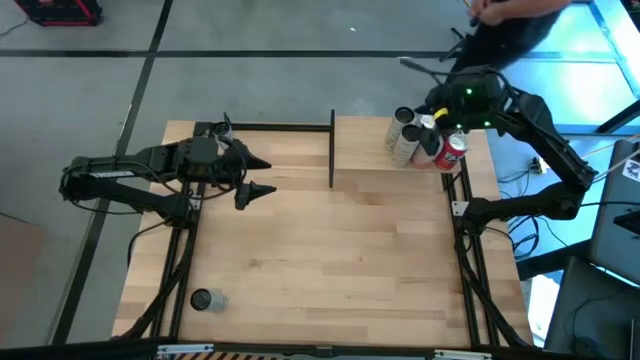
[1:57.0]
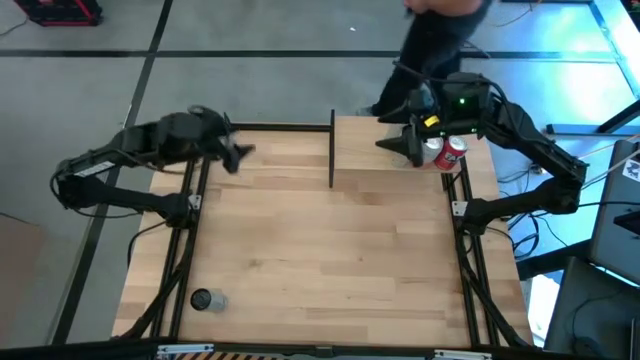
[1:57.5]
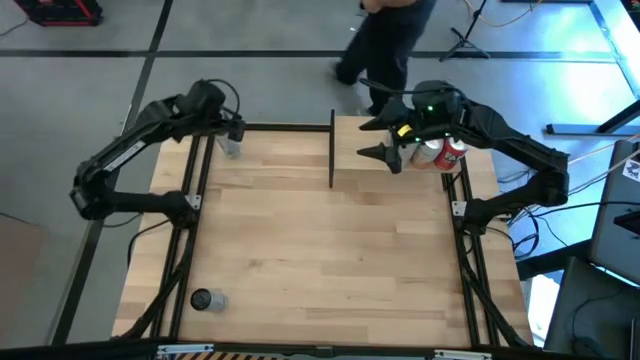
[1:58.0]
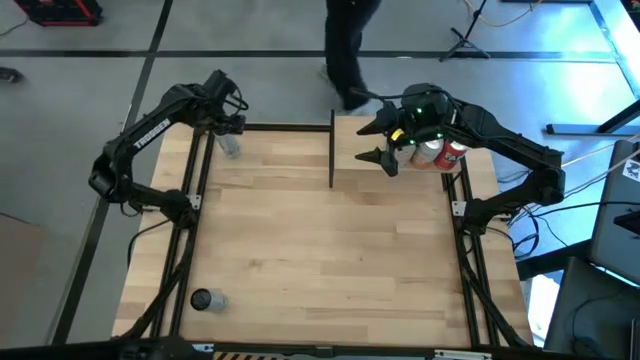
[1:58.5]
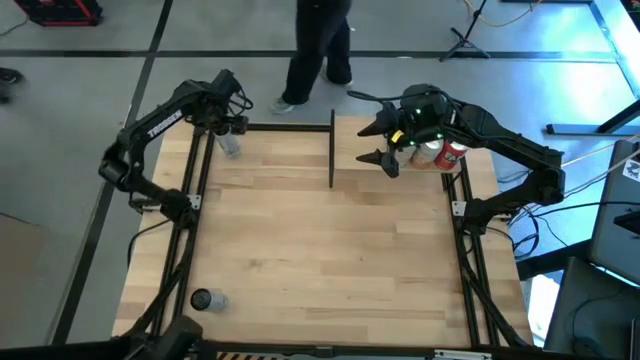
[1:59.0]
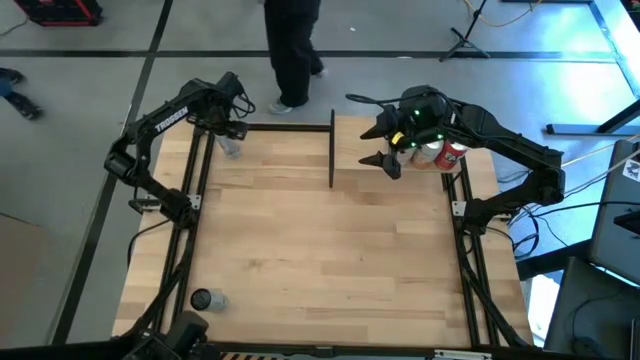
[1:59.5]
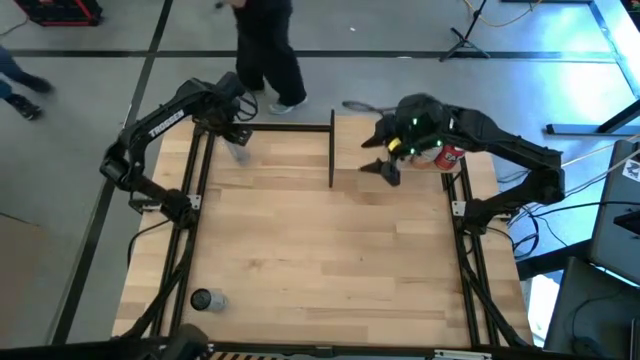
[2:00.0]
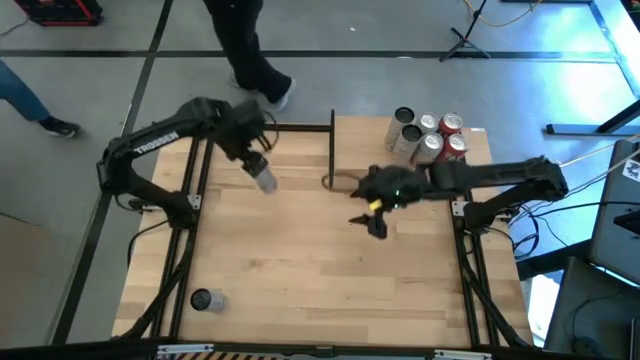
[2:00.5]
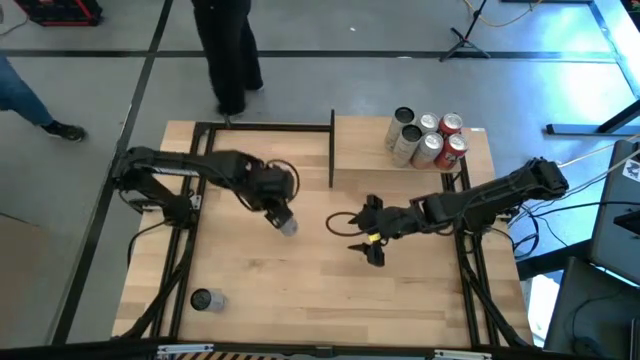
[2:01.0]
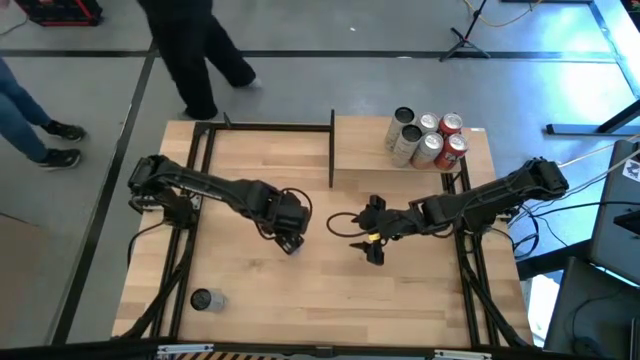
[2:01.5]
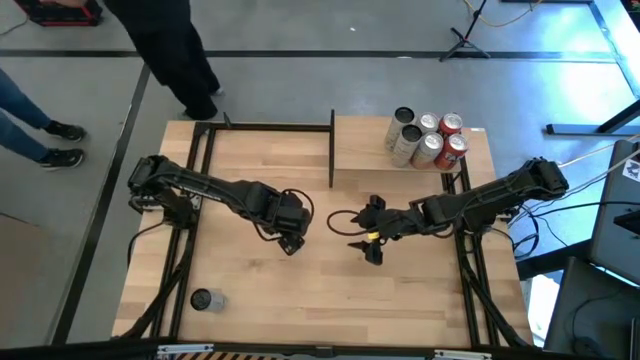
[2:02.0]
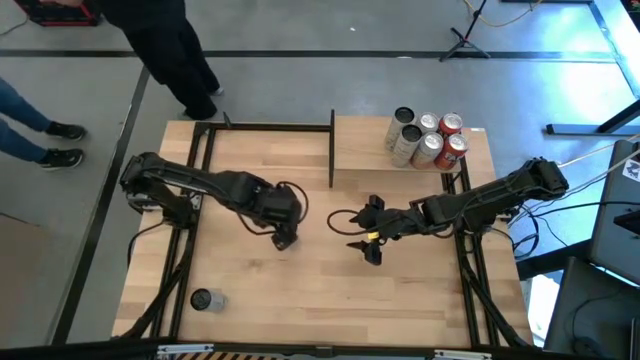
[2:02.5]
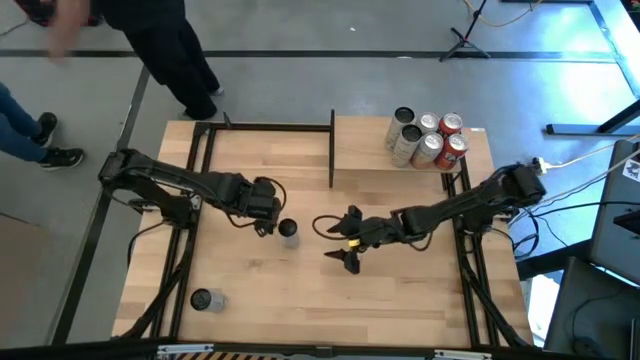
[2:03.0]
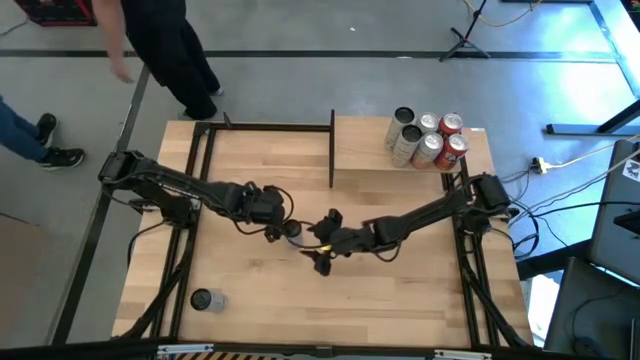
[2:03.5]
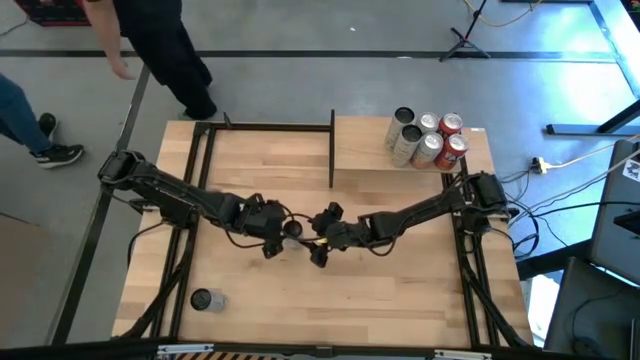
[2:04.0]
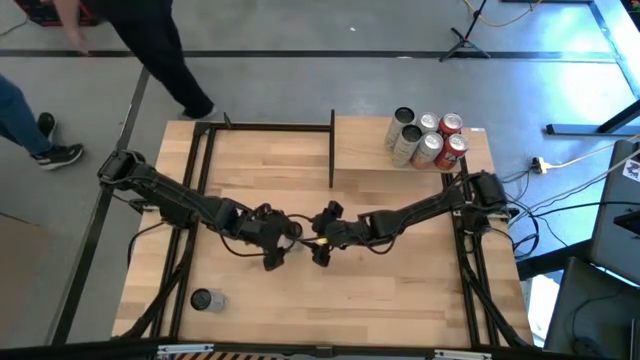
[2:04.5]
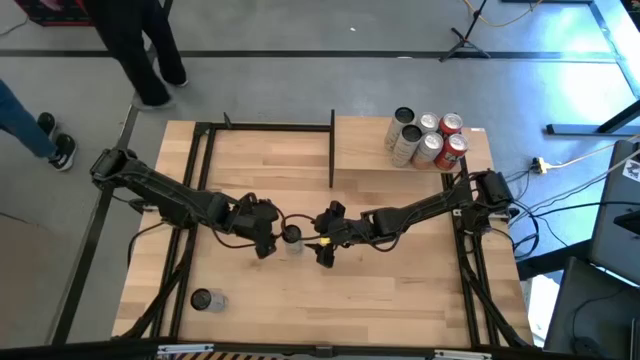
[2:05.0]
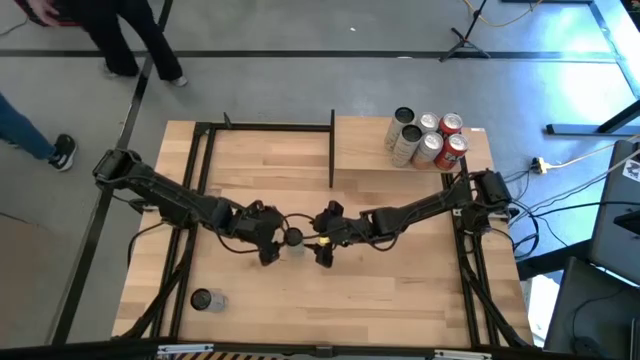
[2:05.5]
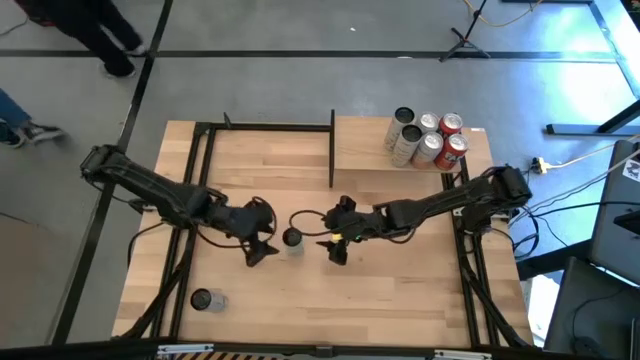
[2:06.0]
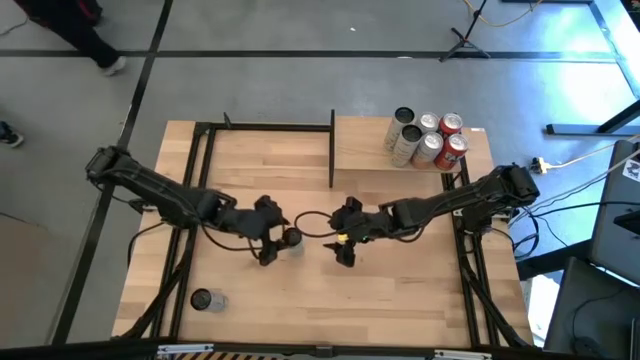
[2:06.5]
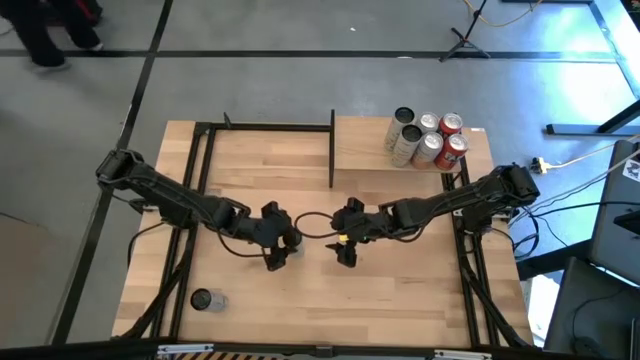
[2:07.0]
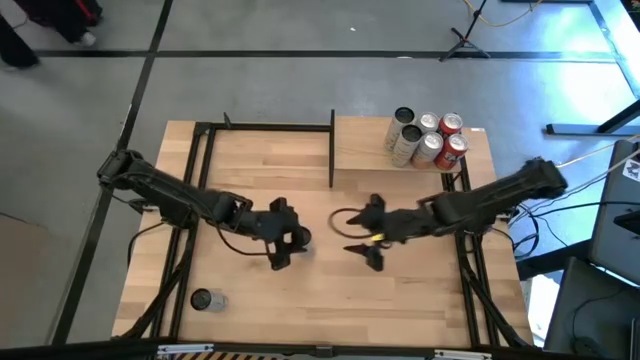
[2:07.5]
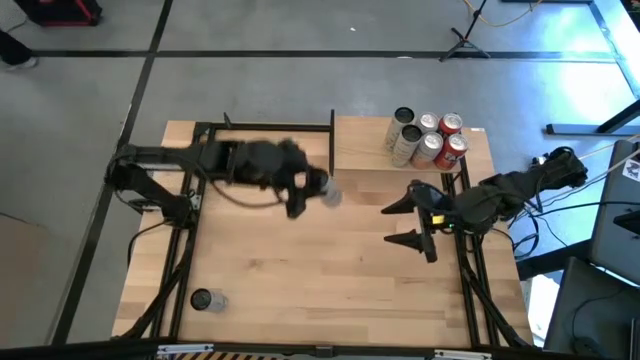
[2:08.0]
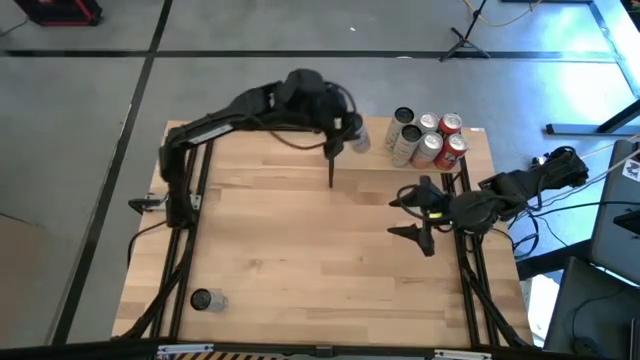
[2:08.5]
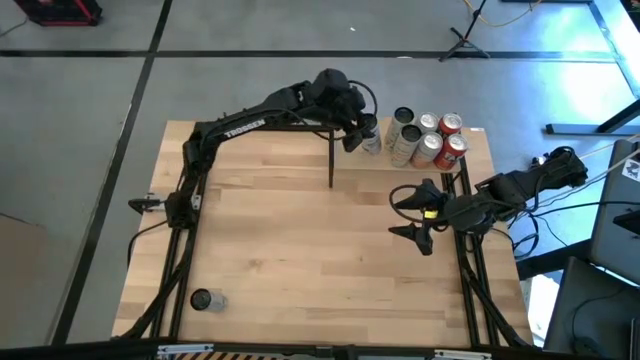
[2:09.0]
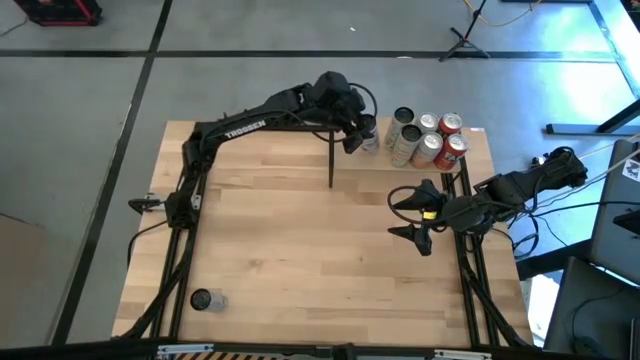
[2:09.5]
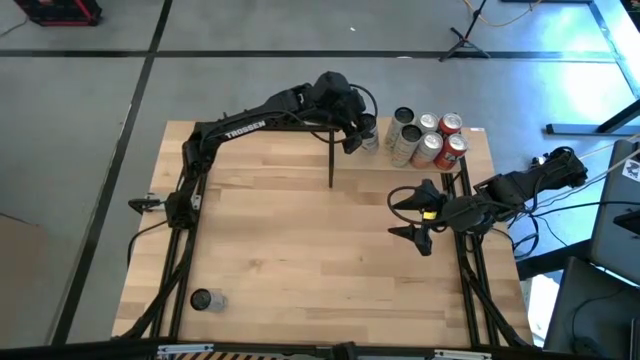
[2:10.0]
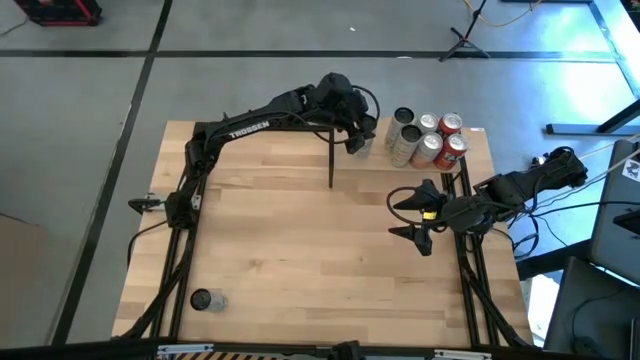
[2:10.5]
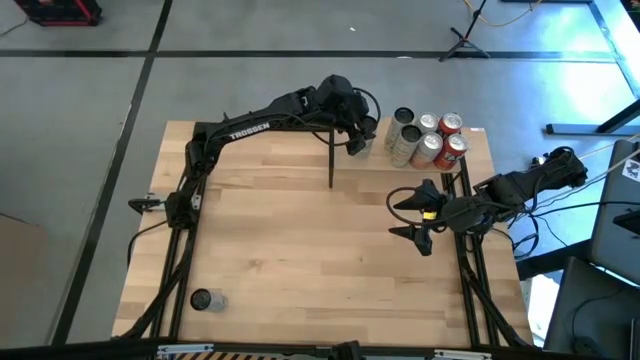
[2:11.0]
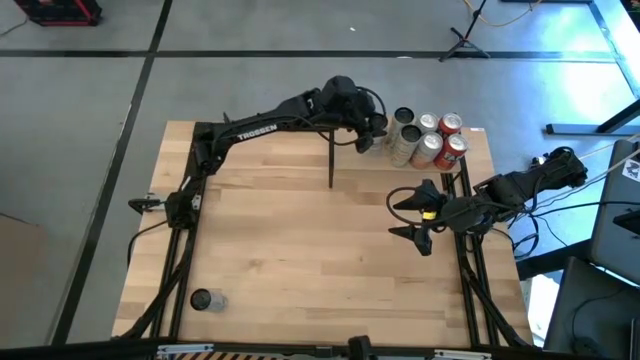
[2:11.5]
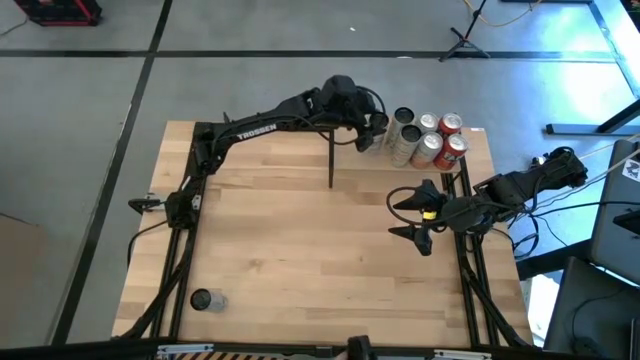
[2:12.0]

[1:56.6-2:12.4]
Task: Place canned beverage on shelf
Put the top white blue soda can on the shelf

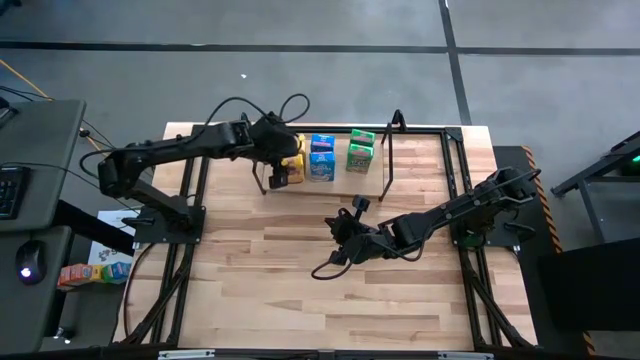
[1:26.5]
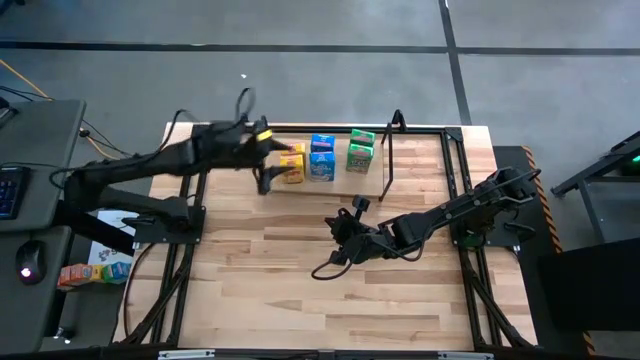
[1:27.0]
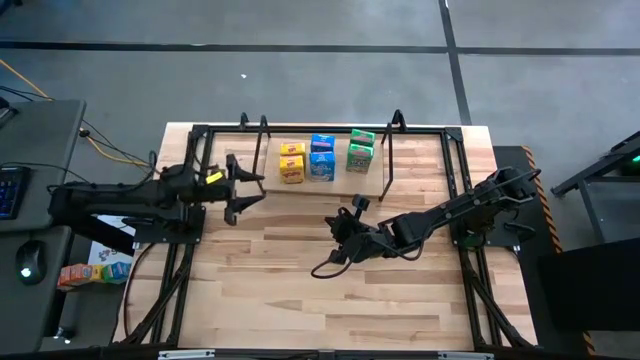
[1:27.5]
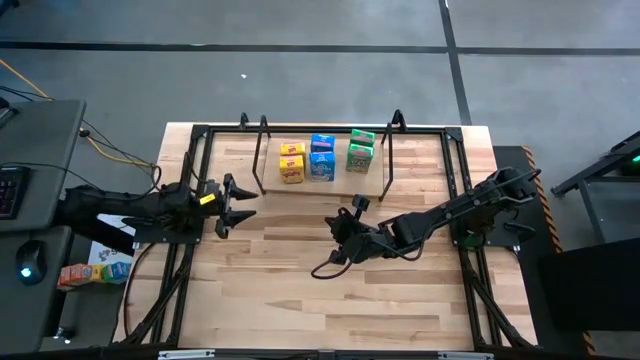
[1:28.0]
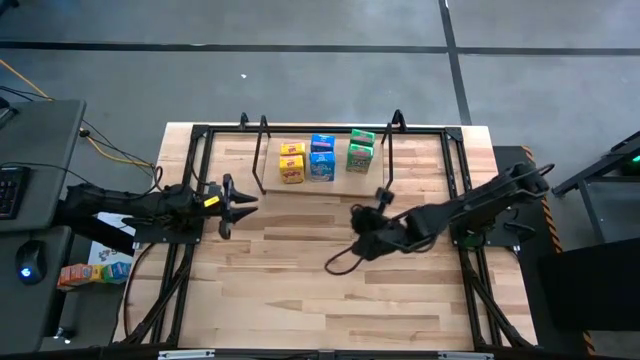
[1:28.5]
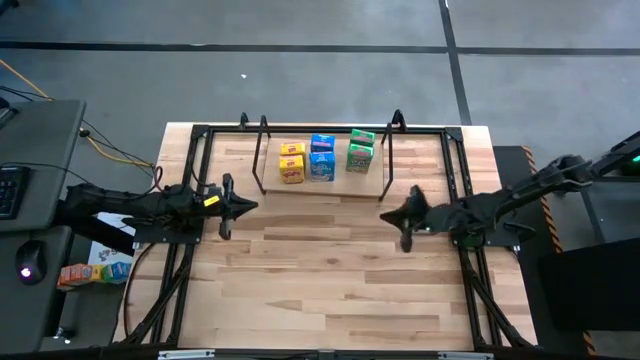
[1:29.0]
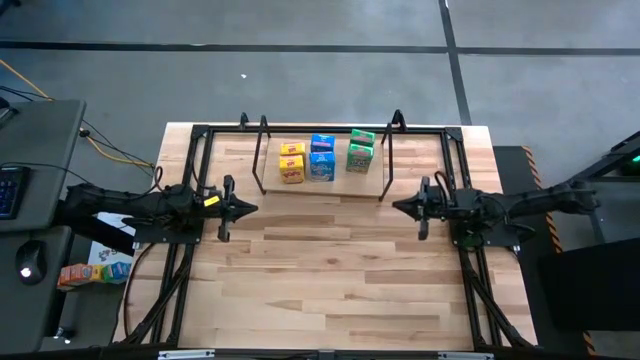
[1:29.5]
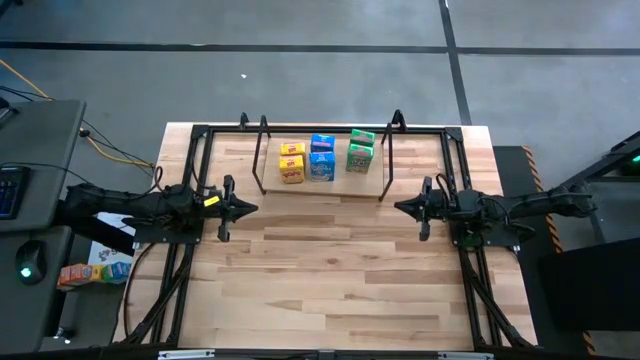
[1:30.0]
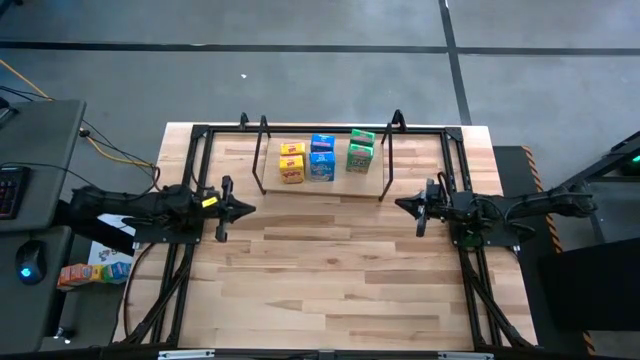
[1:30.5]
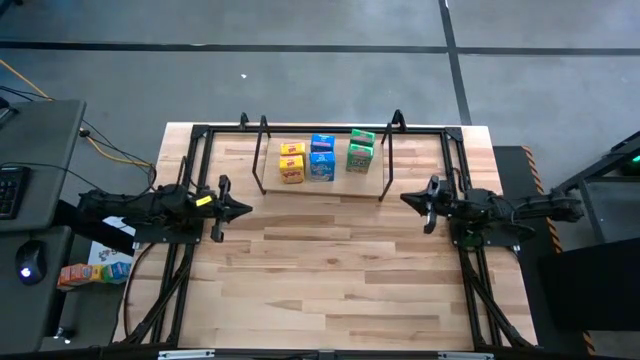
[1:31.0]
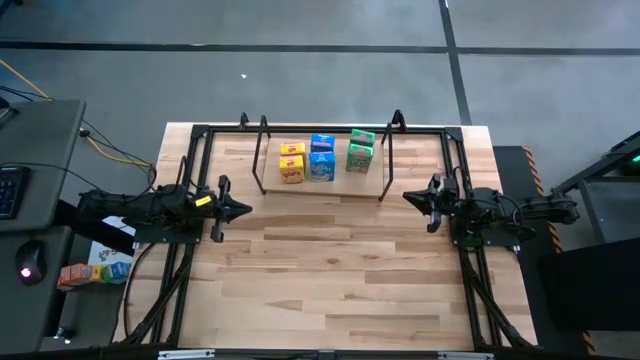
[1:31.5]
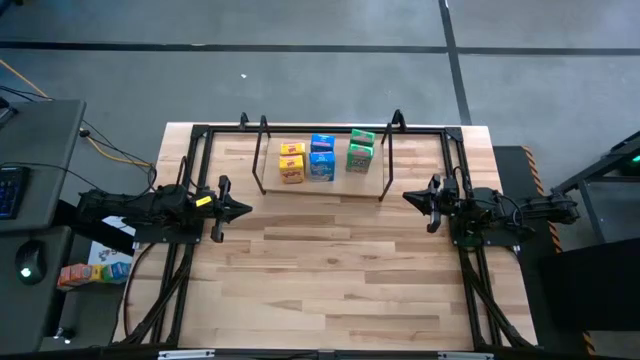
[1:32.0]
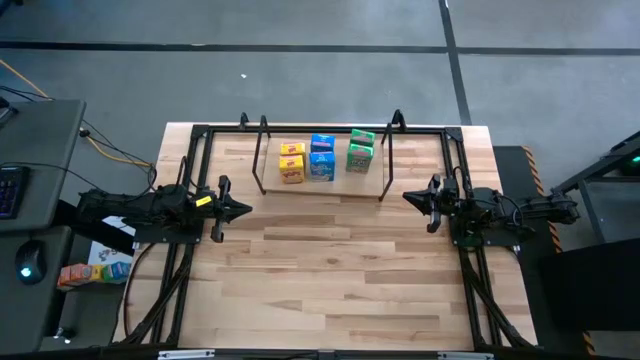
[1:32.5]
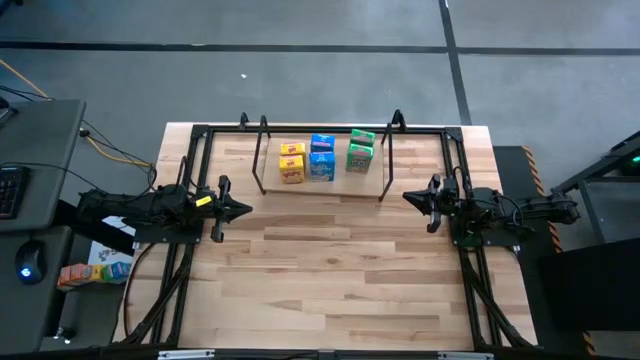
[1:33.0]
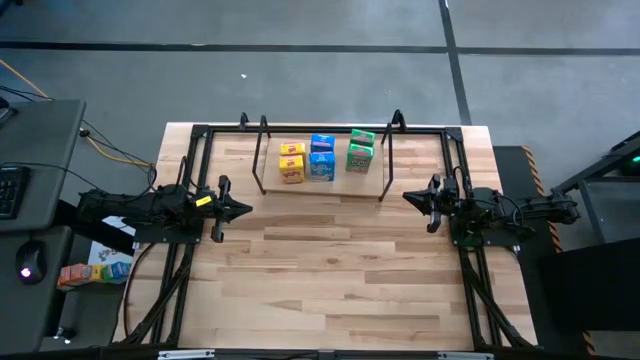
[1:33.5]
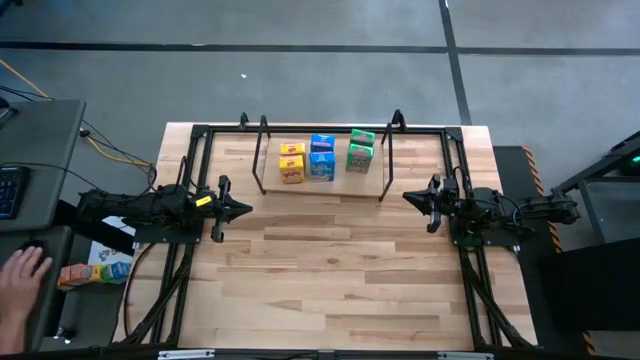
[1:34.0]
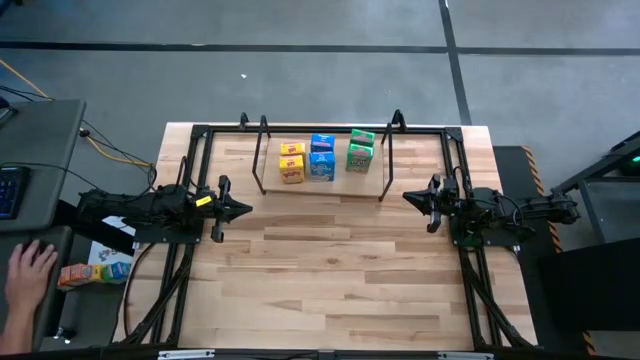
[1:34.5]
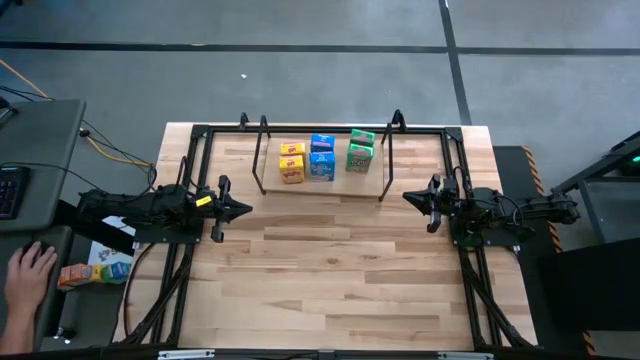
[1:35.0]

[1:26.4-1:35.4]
Task: Stack cereal on shelf
Return to Home Position
